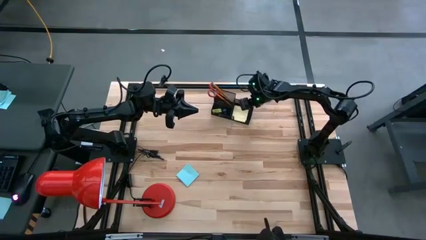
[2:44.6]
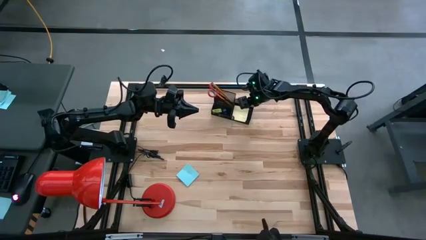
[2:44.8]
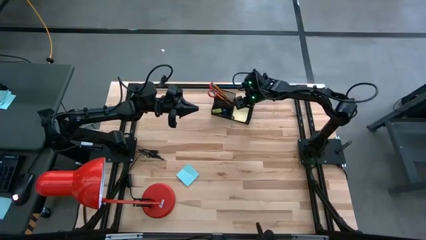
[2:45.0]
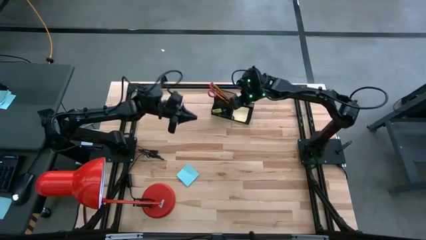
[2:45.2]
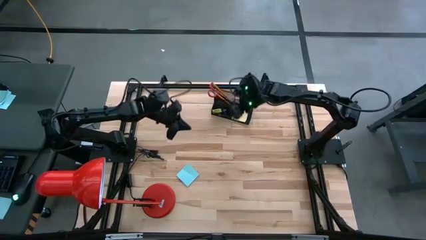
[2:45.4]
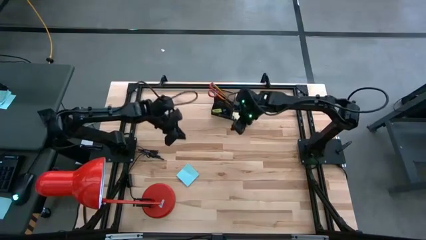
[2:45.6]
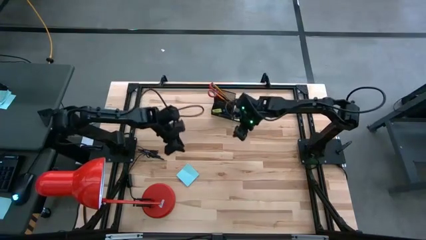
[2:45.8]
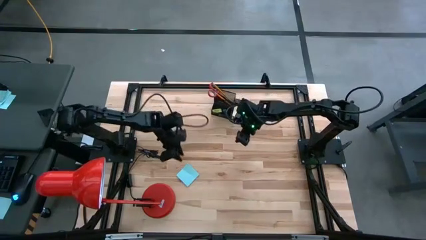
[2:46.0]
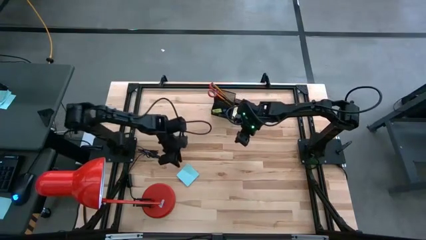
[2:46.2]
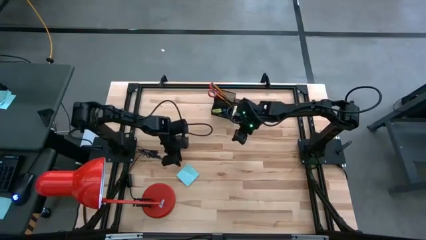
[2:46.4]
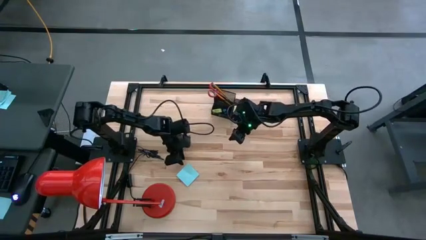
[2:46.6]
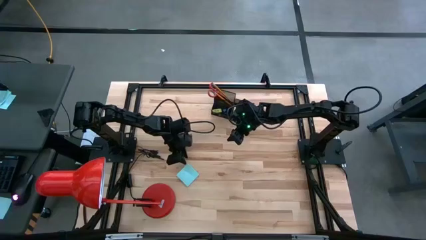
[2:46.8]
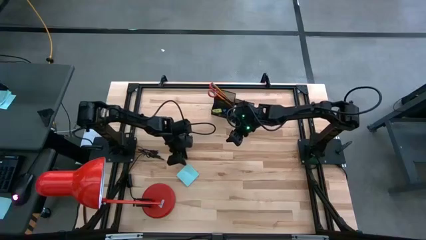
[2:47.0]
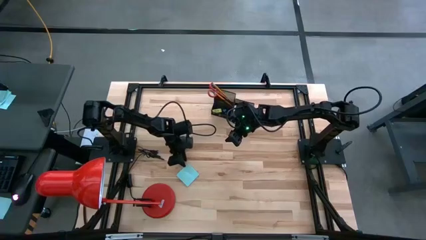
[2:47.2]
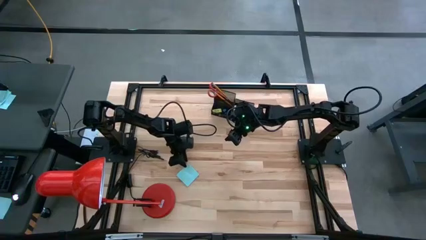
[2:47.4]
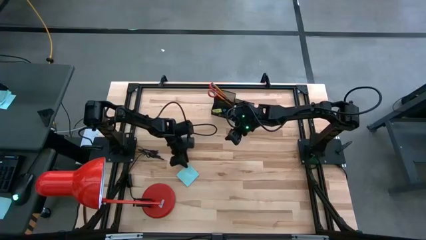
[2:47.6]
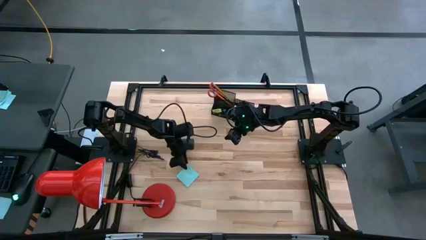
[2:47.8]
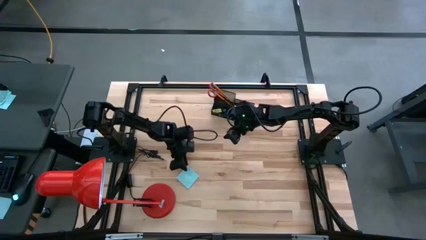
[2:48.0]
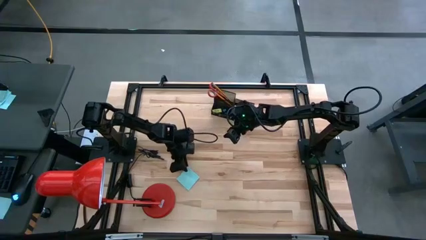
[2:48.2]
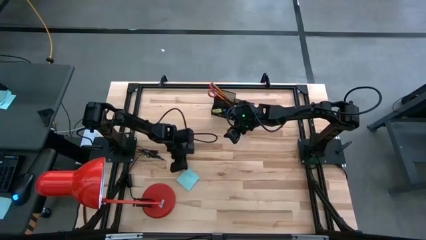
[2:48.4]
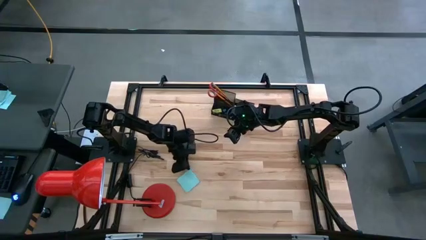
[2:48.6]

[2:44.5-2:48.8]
Task: Pick and place office supplies into organizer
Put the blue sticky notes in the black desk organizer

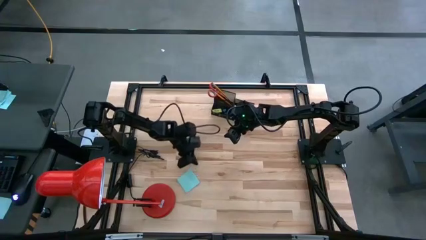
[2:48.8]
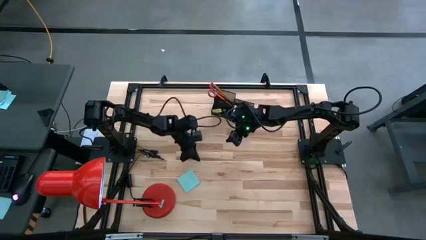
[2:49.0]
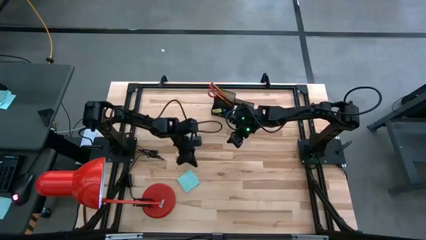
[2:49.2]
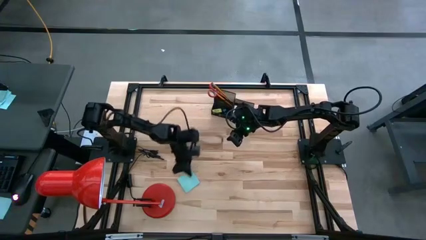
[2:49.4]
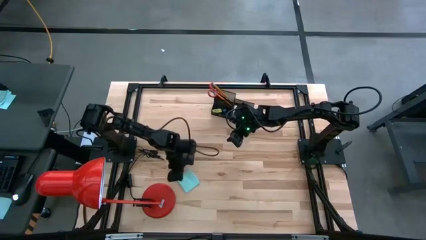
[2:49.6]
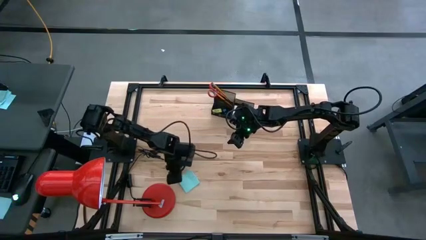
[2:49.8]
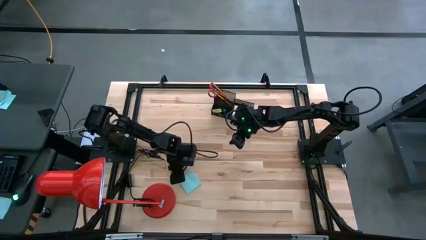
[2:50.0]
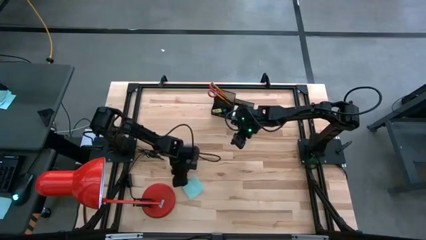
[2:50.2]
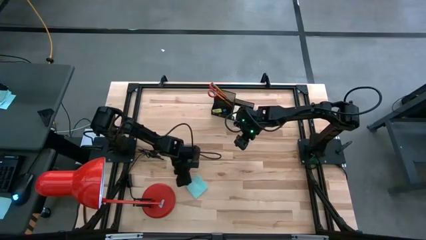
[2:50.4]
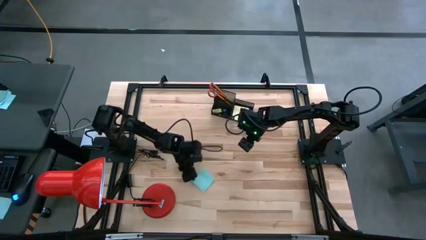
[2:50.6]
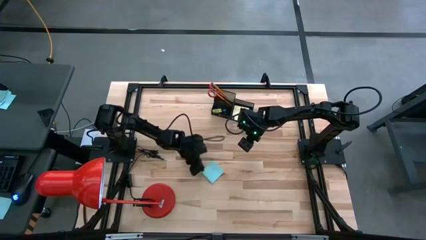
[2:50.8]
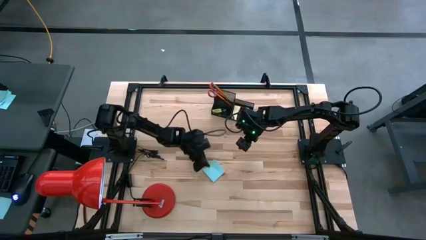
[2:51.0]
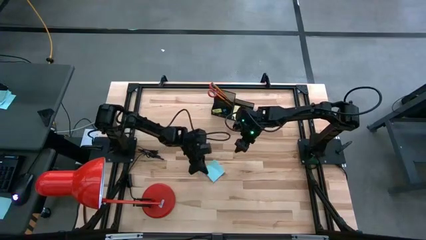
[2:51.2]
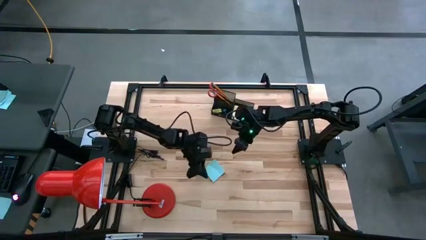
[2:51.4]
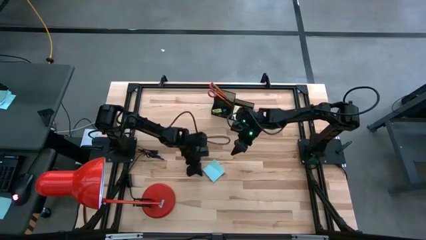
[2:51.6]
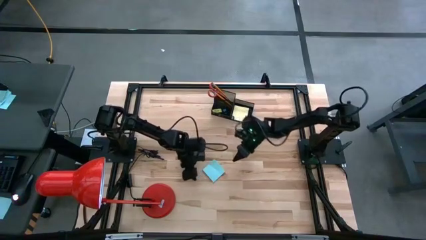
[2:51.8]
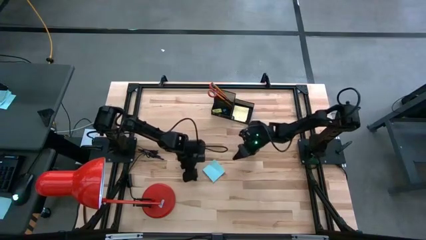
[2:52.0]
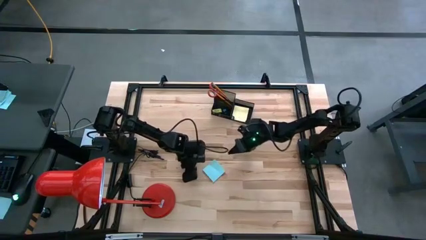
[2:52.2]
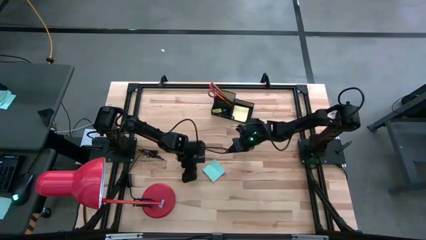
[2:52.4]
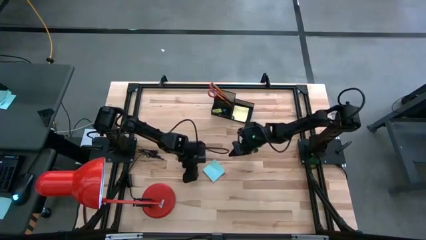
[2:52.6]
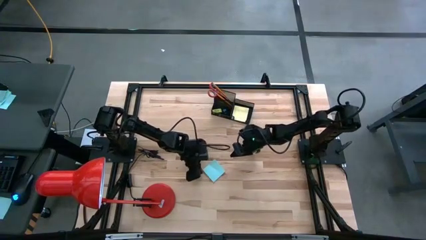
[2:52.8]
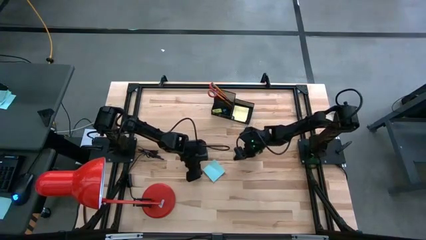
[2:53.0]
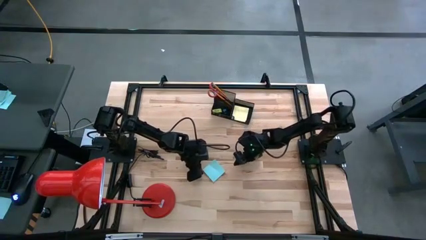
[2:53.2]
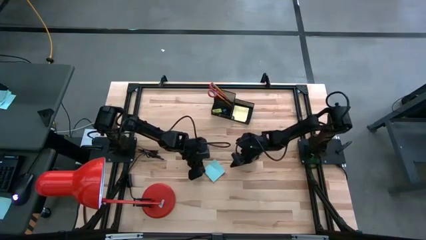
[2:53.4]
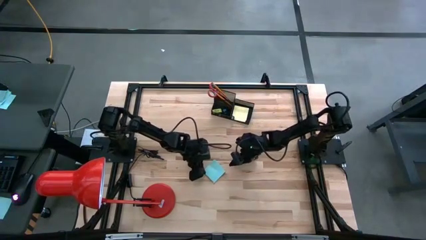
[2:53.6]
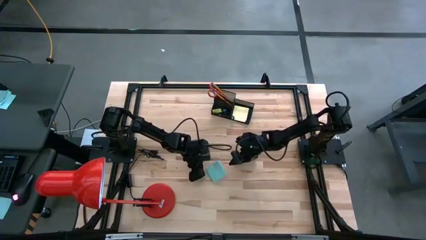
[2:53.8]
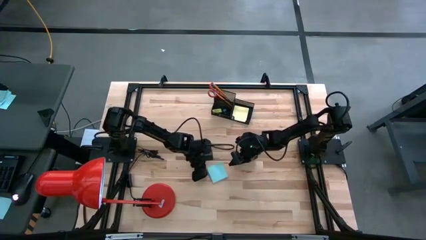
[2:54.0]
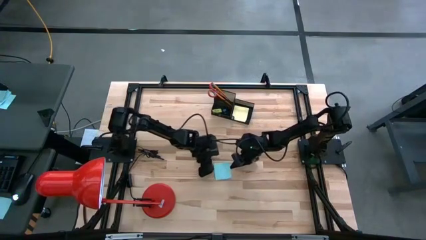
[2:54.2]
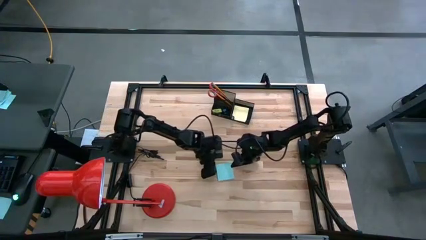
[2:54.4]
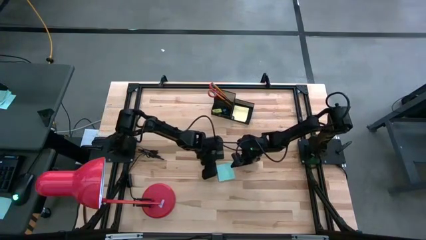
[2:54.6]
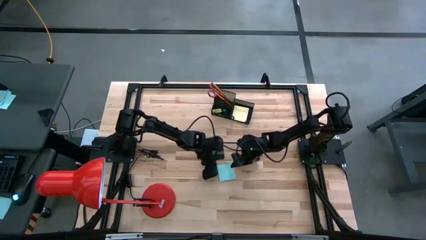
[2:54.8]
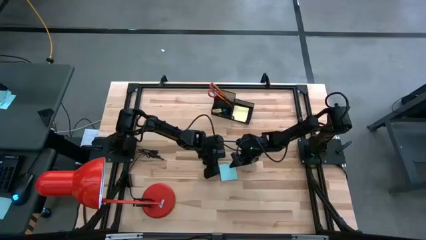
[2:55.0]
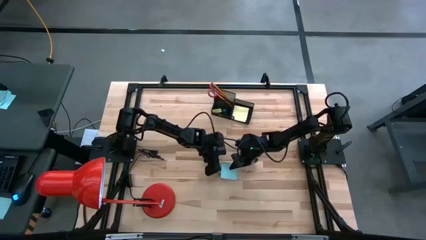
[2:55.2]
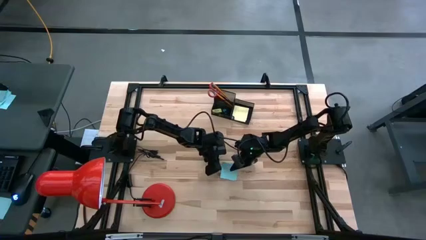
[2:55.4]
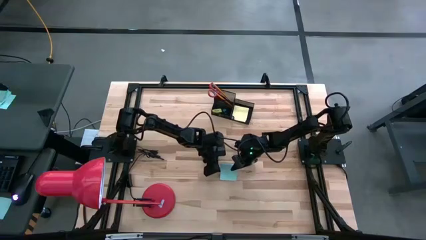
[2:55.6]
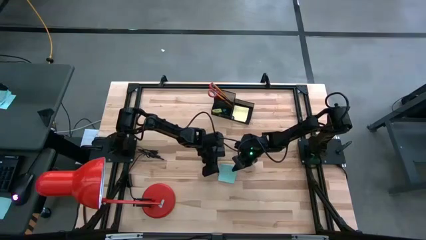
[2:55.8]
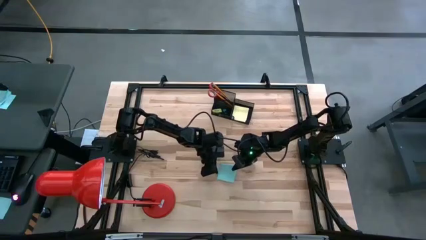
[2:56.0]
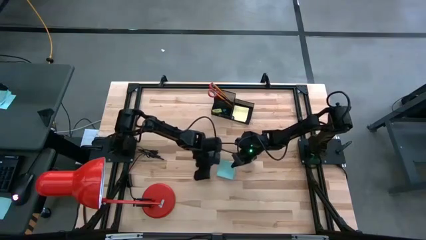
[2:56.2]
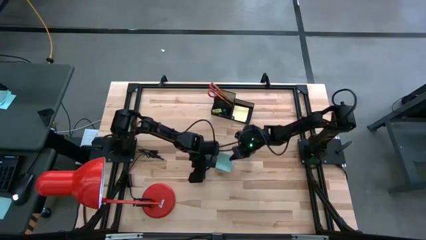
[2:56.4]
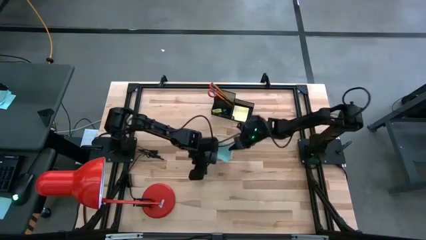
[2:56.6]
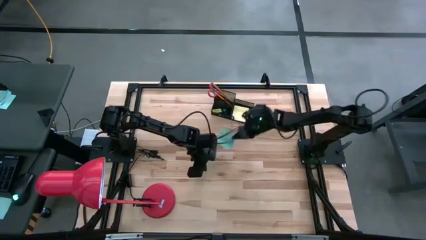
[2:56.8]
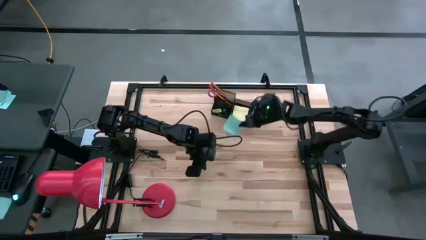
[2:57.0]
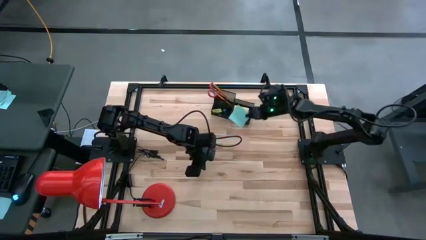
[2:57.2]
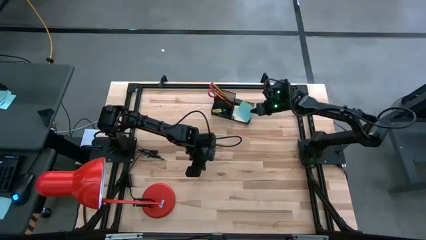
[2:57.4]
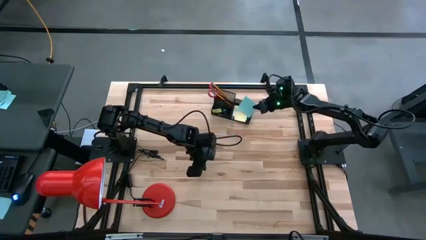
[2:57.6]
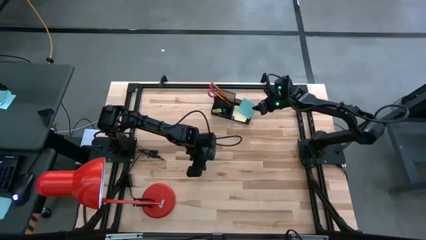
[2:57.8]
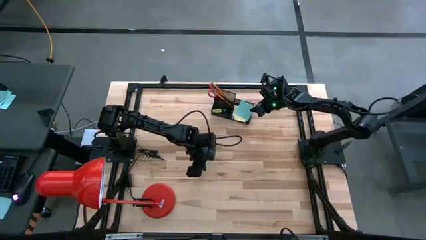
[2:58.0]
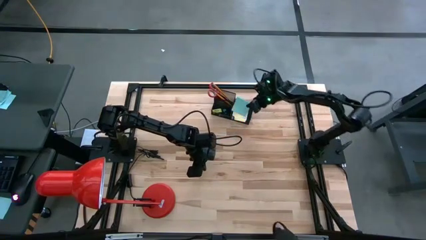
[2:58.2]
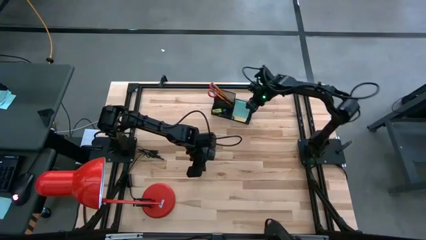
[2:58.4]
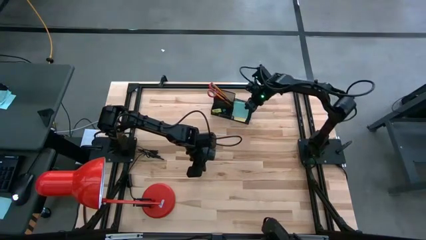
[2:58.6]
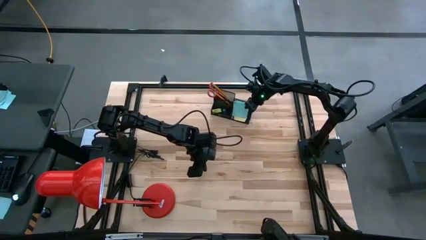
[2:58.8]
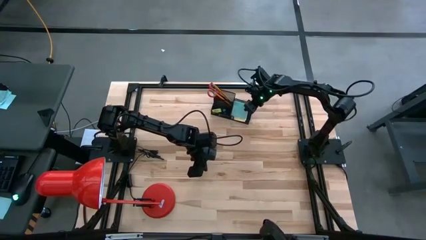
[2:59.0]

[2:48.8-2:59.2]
Put the blue sticky notes in the black desk organizer

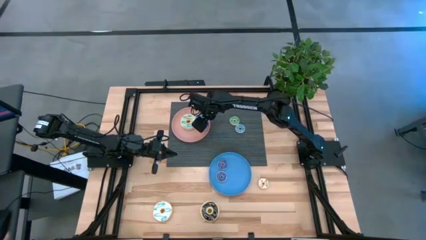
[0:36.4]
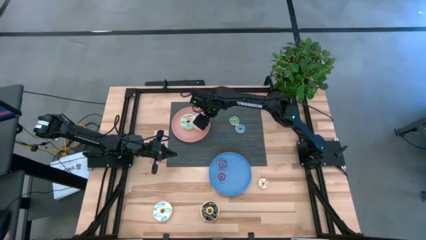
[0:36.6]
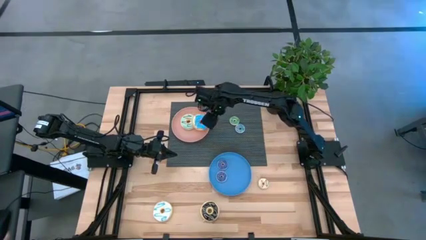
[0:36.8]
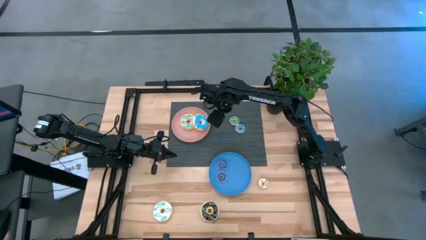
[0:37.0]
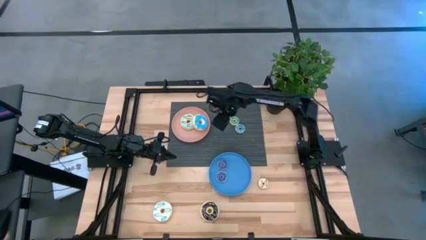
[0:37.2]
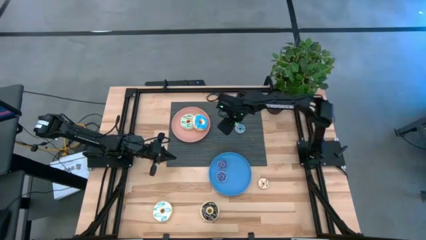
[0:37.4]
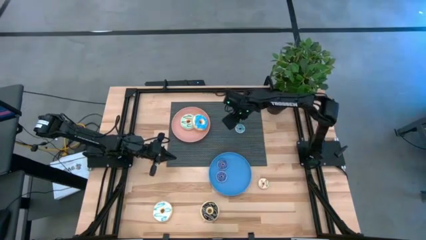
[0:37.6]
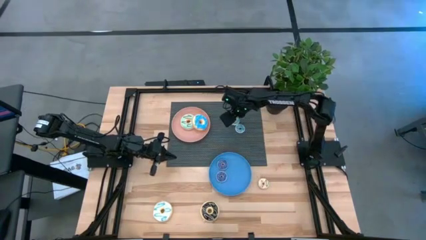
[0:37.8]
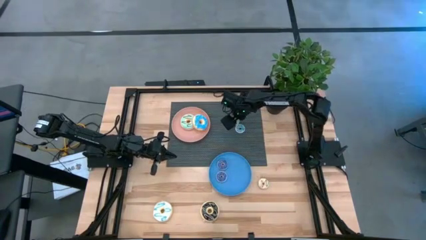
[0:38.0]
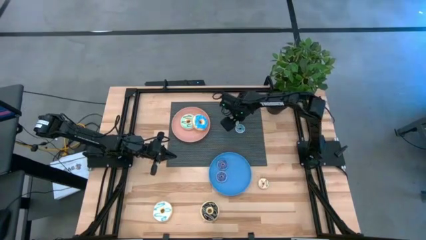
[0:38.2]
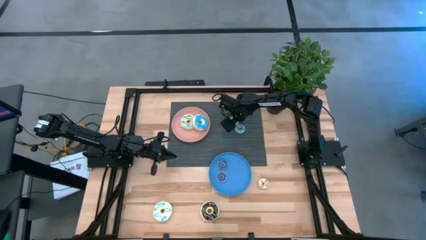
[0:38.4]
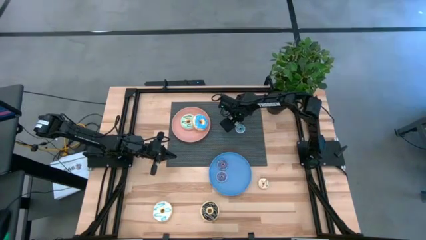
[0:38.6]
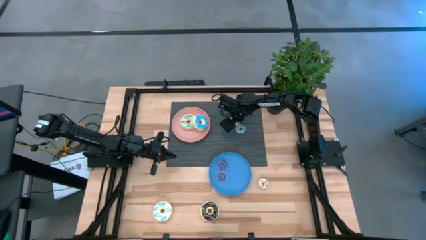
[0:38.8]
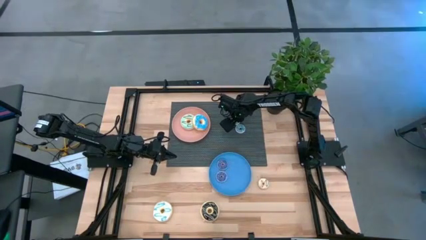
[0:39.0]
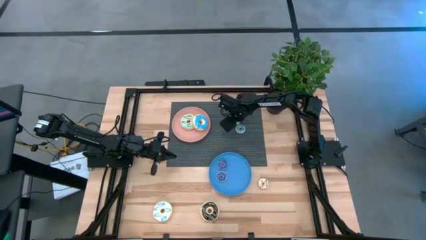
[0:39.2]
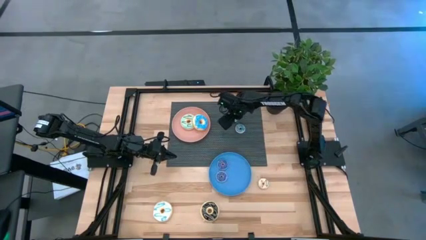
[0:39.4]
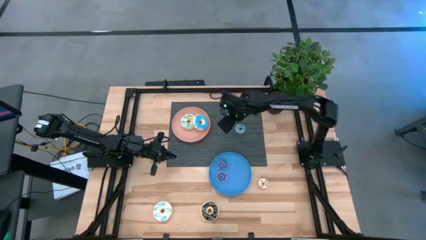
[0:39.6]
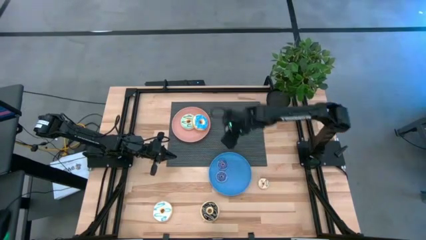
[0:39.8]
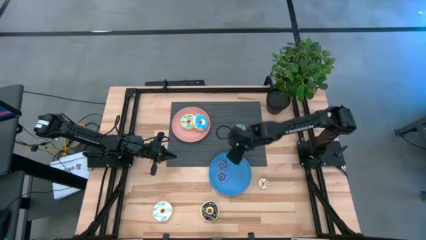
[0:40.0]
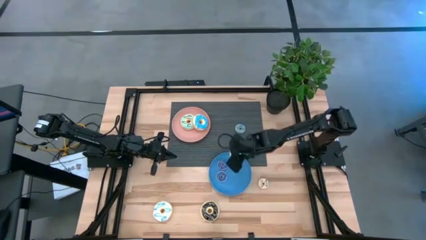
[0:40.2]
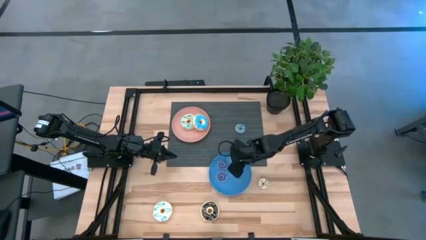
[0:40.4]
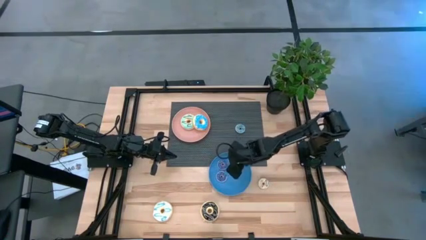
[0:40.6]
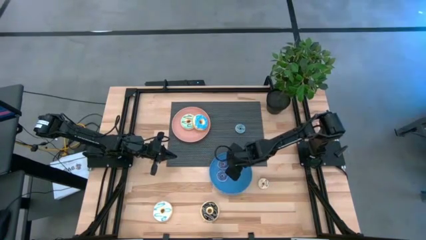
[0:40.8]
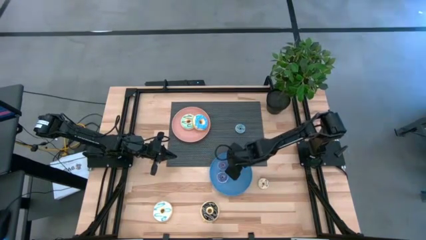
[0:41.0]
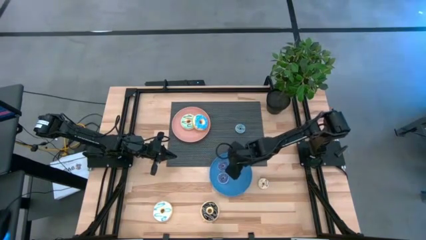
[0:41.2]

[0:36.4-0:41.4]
Task: Pick & Place donuts
Put the small green donut into the blue plate
